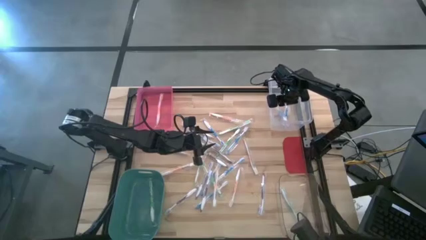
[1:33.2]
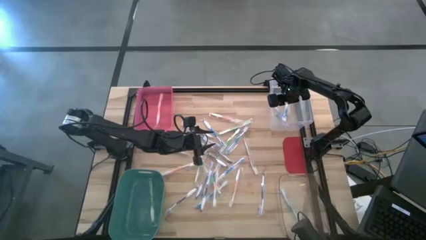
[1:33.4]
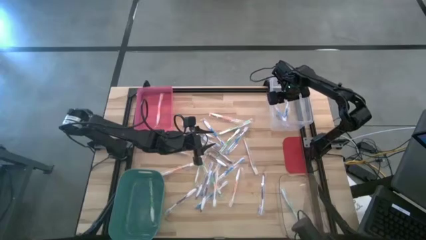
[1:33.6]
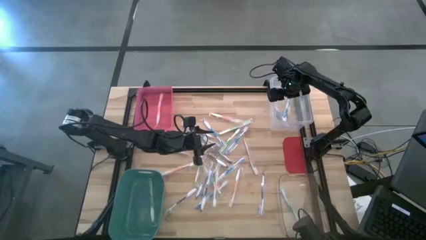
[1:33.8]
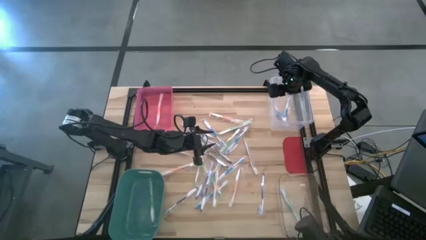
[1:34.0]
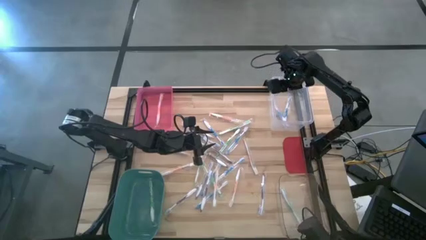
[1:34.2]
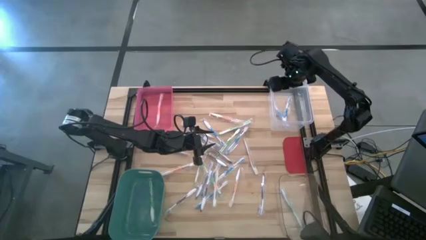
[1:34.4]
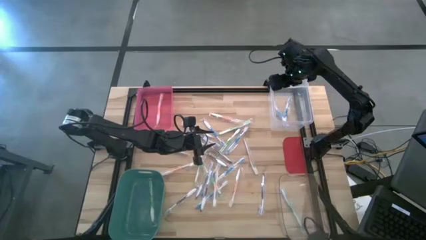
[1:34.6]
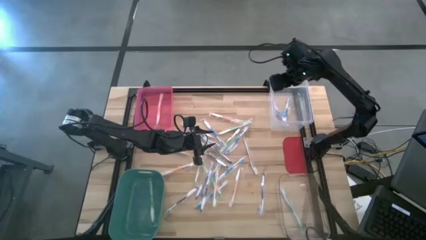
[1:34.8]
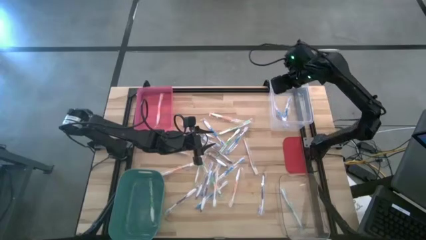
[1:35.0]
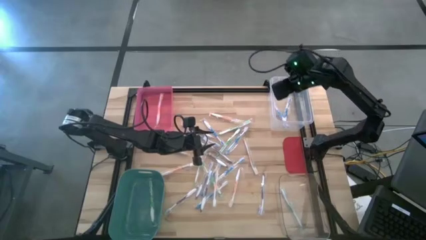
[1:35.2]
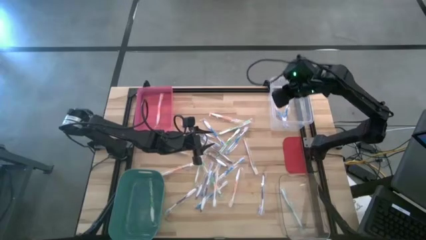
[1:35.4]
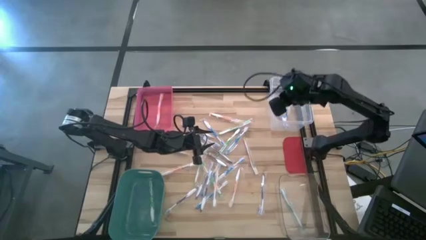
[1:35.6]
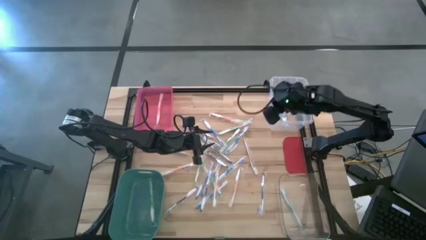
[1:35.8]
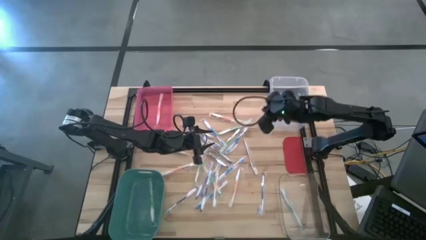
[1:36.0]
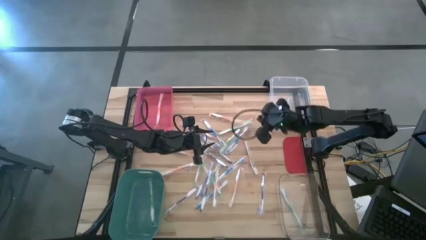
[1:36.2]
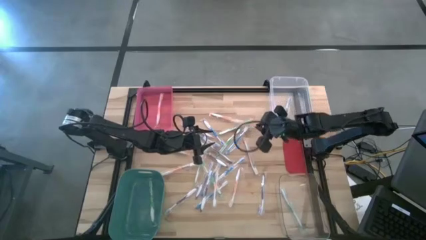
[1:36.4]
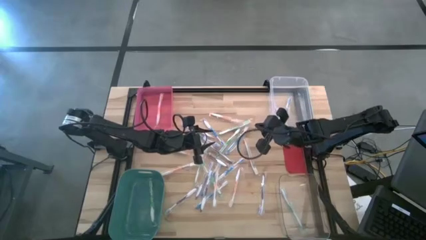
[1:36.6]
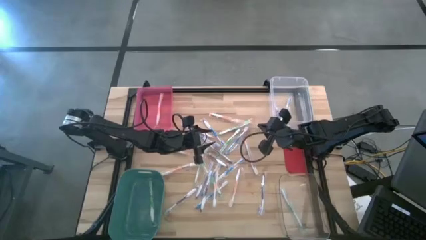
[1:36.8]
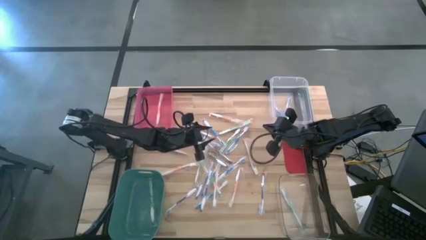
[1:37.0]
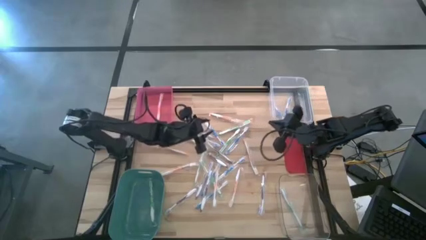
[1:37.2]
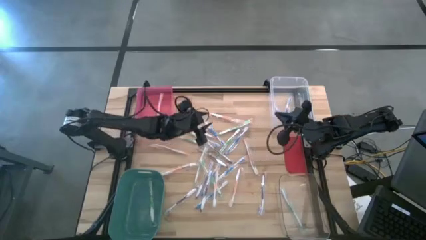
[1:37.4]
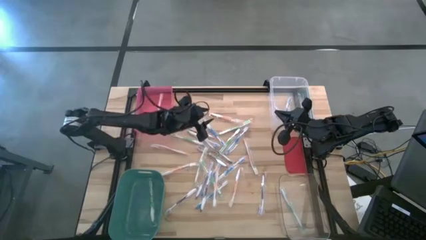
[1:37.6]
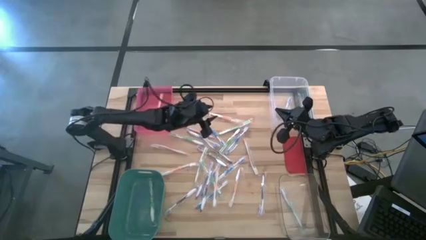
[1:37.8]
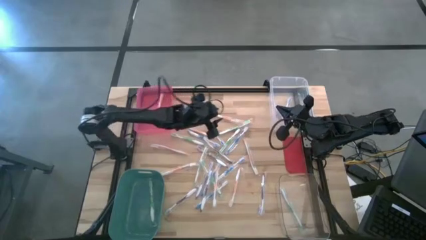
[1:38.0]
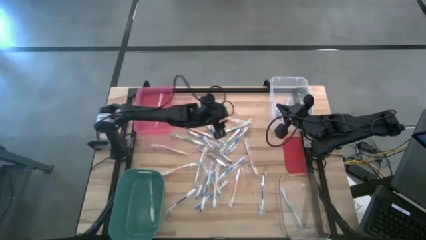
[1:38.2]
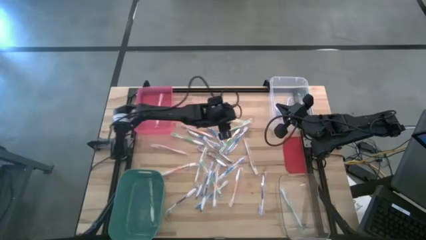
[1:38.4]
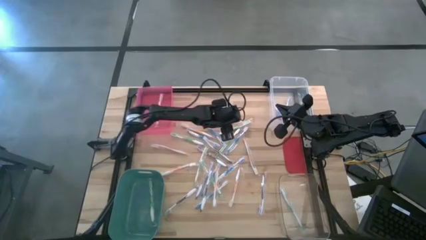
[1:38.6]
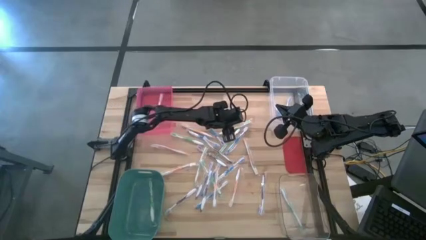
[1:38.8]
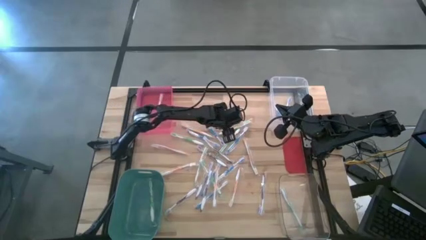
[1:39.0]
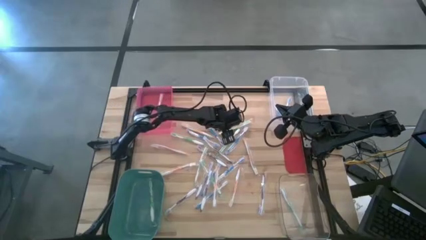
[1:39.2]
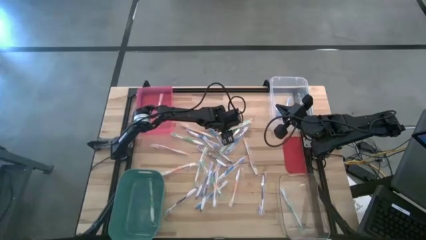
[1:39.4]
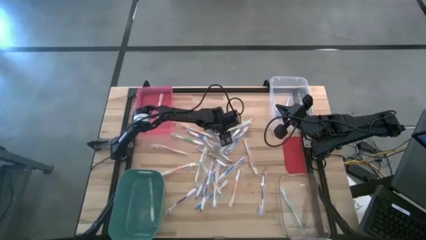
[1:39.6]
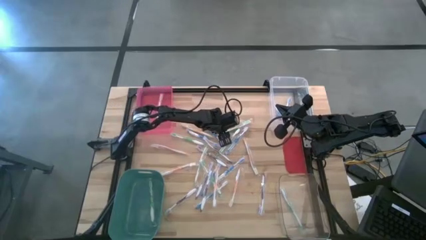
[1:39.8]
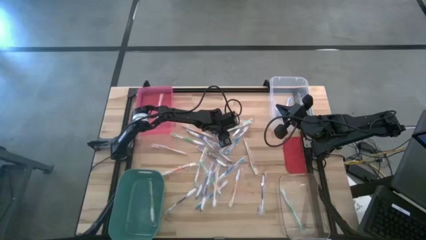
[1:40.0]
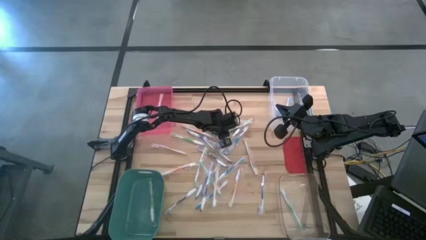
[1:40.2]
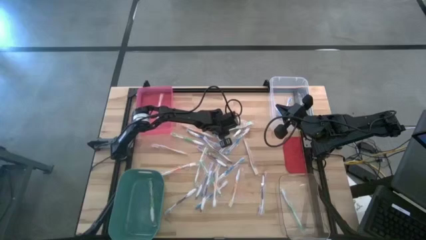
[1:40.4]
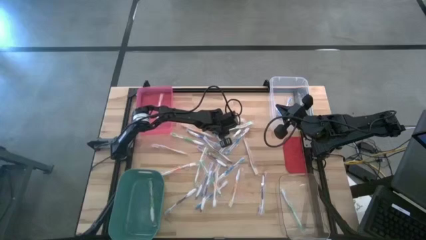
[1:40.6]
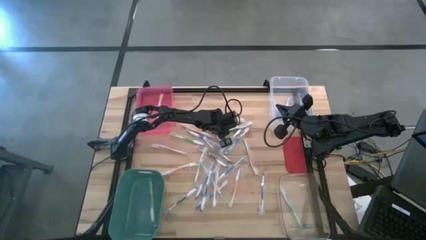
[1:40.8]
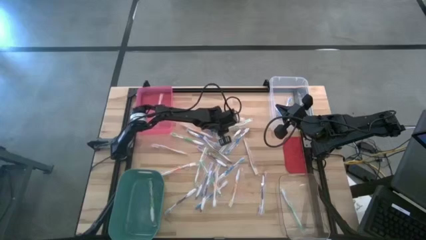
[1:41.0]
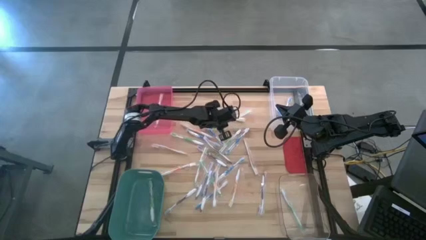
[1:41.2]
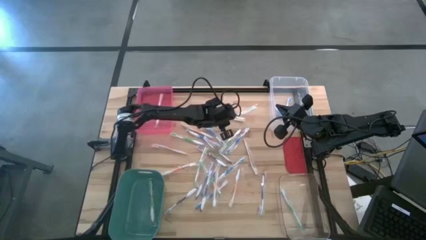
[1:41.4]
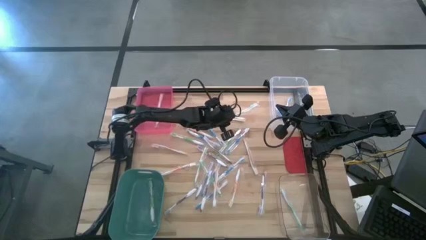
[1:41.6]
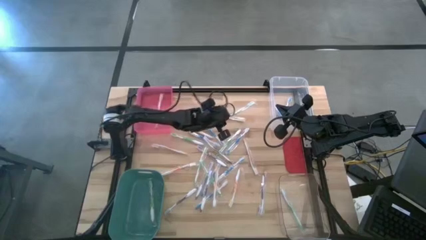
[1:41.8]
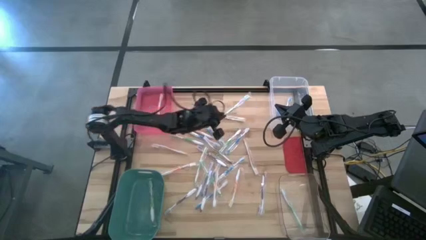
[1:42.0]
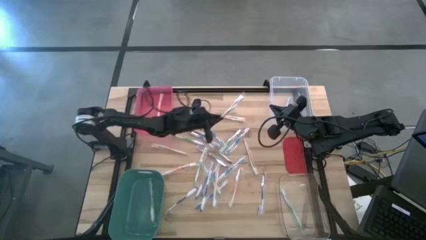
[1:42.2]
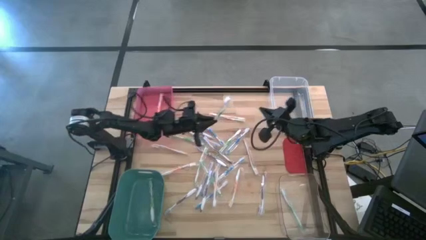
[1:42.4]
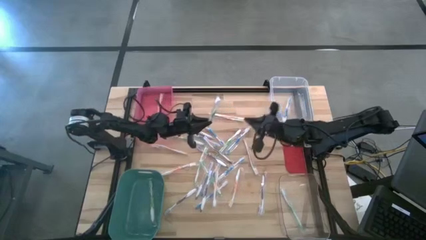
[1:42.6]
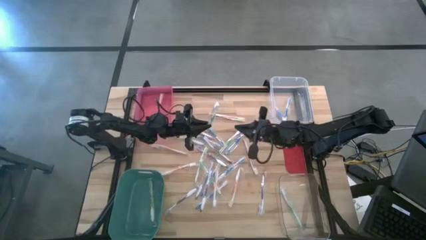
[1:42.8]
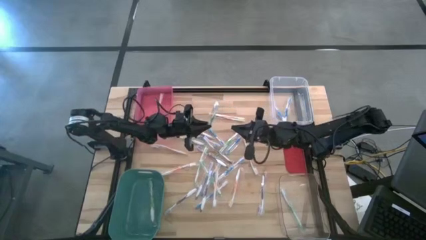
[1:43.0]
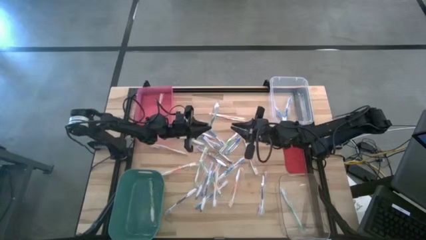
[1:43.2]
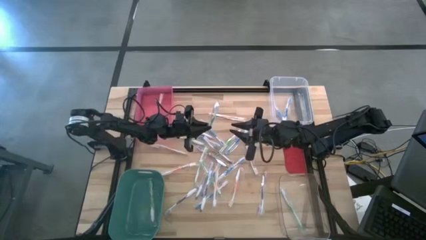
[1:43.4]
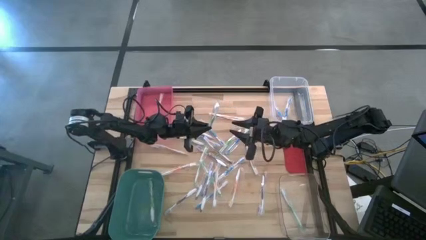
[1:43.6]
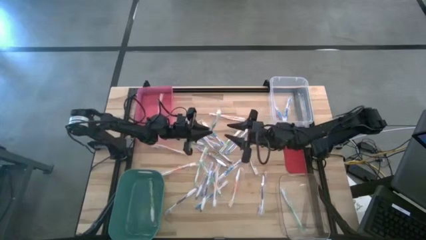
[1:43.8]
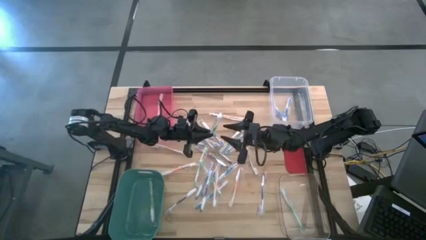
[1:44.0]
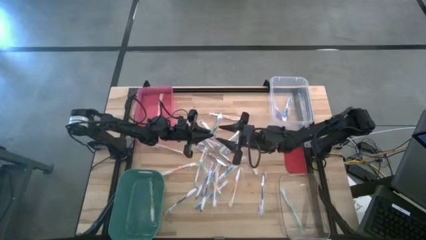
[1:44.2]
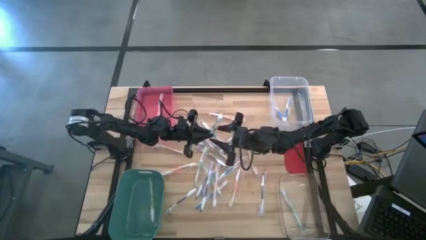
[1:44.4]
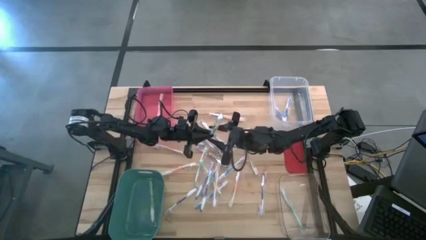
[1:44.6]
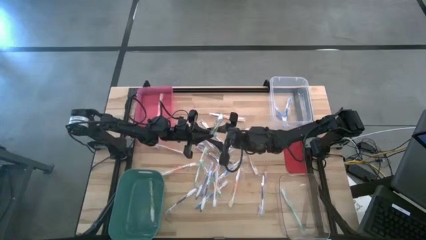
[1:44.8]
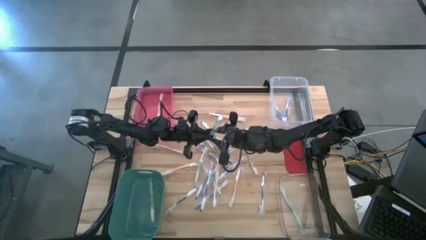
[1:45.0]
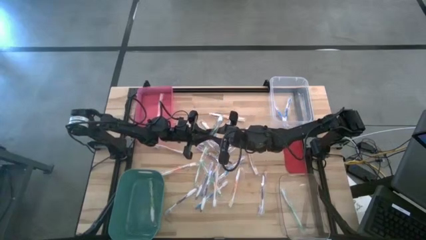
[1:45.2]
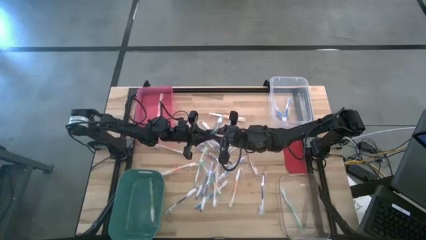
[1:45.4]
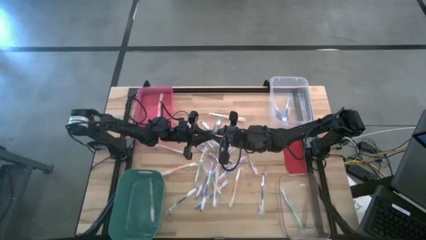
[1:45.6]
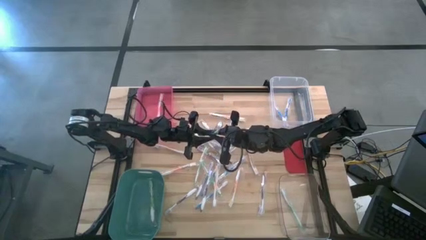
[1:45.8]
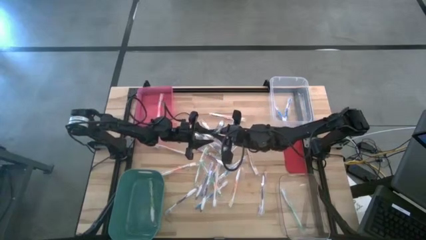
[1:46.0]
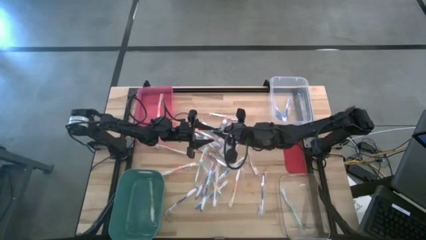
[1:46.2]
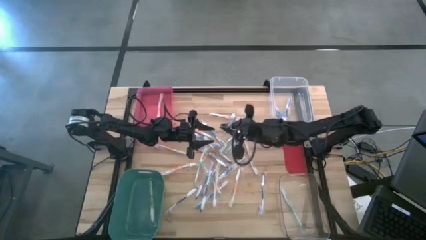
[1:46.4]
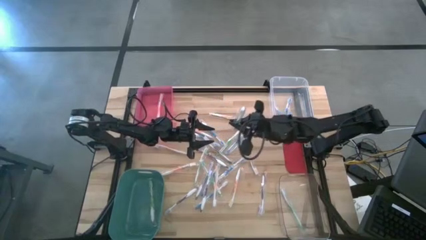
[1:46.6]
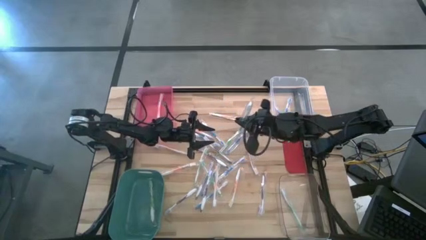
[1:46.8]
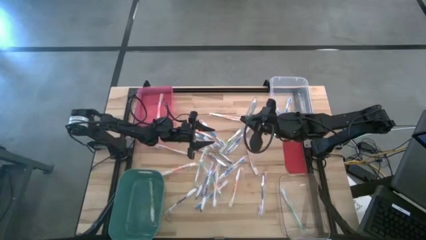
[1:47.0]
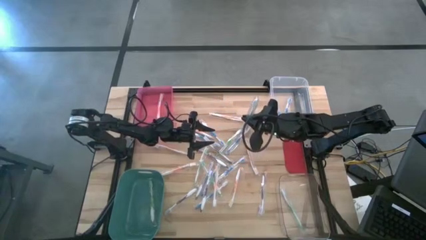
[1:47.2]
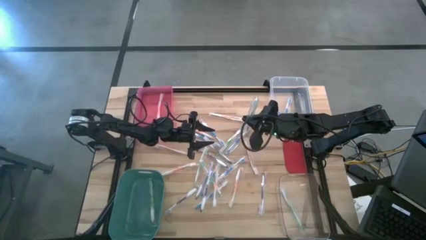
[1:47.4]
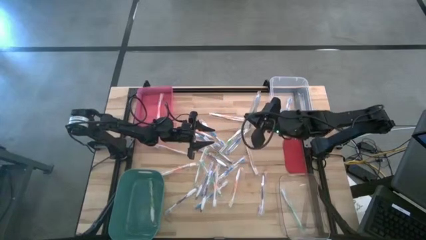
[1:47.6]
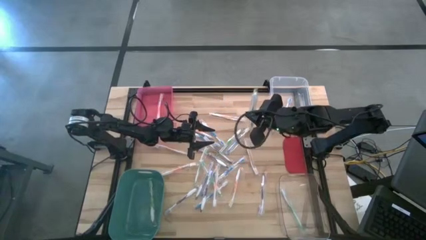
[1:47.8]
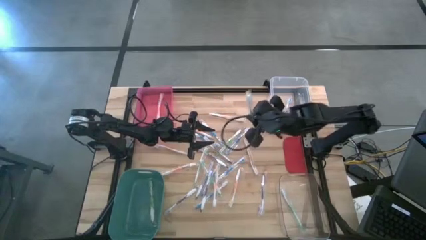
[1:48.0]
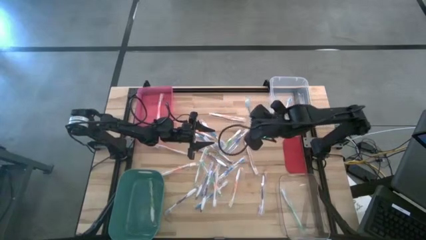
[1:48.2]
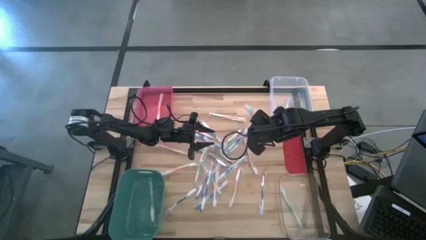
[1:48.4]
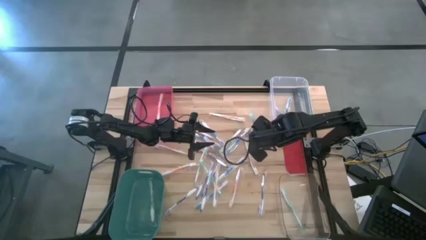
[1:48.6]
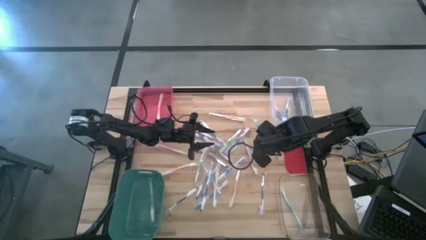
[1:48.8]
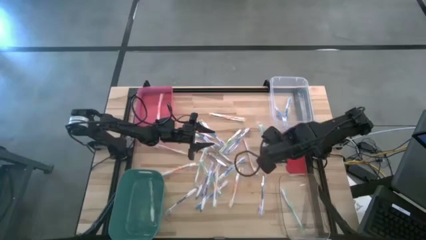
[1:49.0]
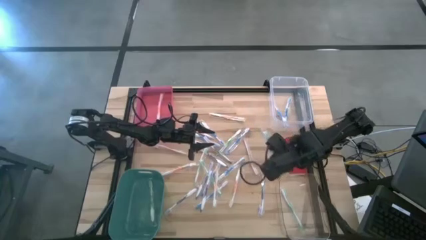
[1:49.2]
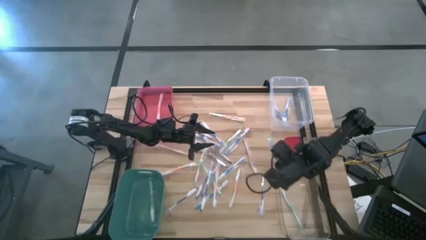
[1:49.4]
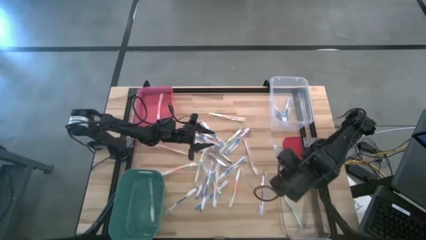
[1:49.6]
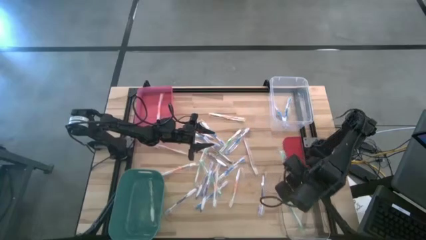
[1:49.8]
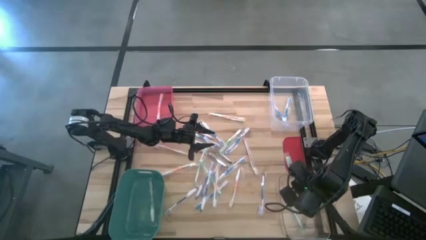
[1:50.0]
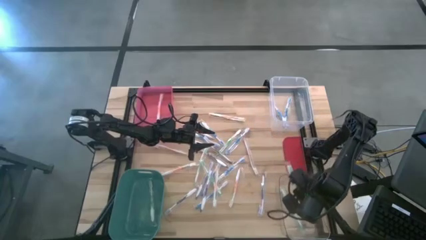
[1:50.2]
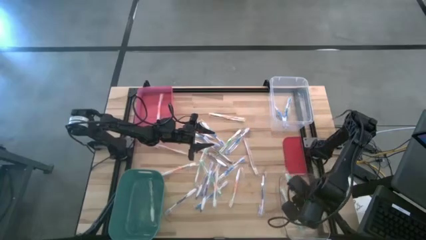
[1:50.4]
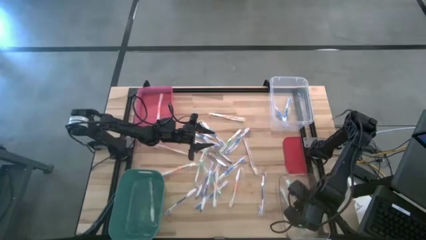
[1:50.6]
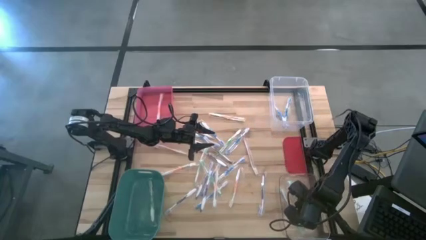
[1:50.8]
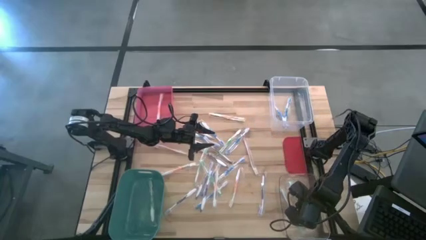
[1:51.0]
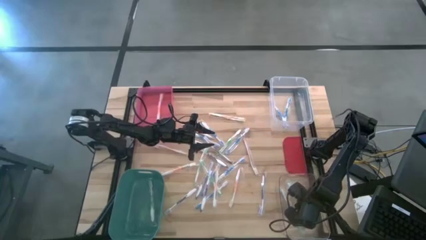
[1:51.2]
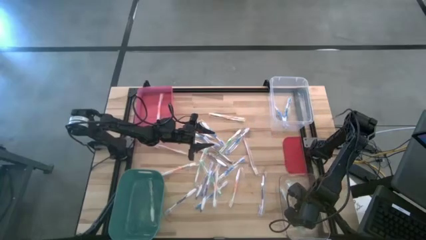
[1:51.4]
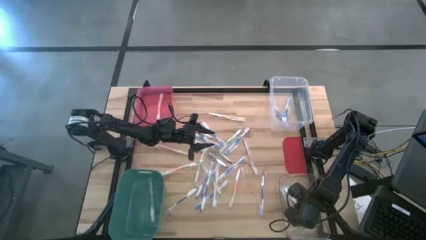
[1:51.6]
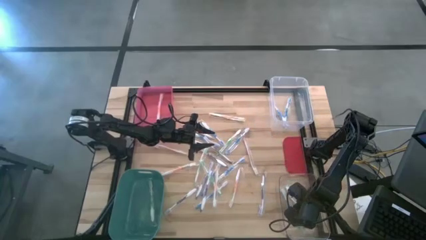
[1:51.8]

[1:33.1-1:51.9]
Task: Pick & Place Toothbrushes
Put the green toothbrush into the green bin
